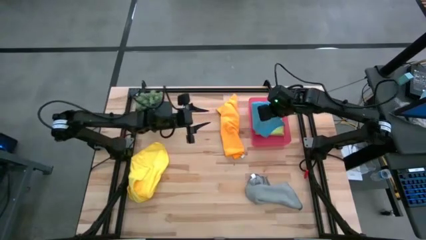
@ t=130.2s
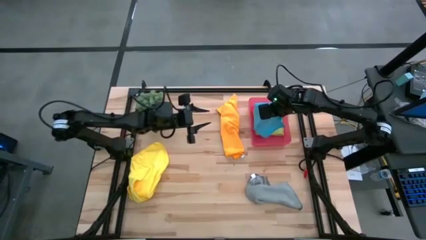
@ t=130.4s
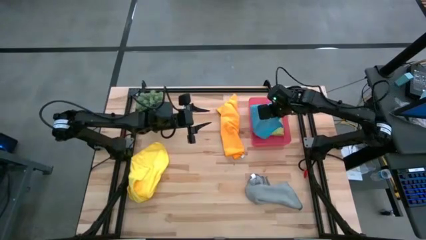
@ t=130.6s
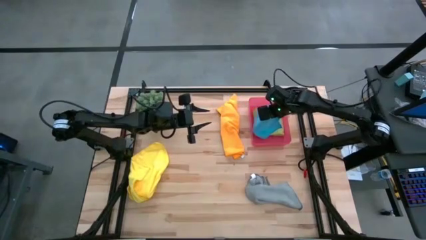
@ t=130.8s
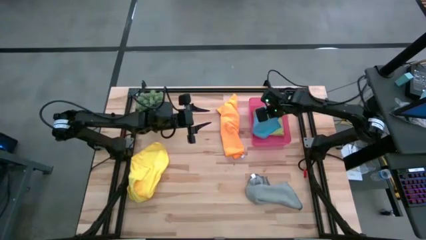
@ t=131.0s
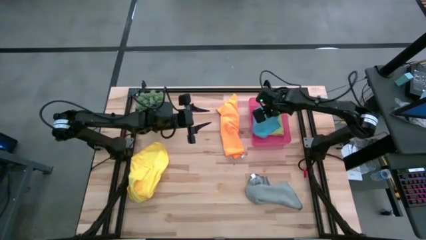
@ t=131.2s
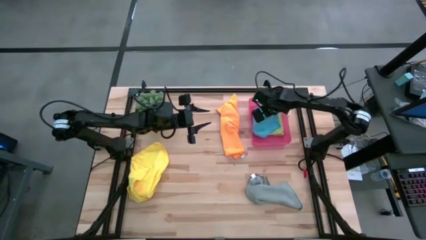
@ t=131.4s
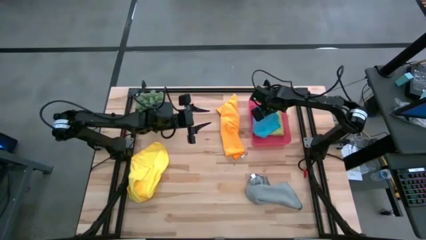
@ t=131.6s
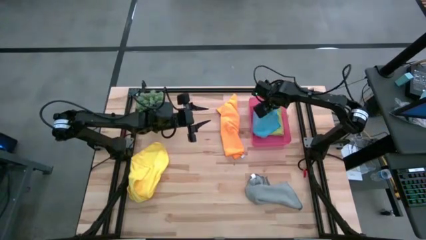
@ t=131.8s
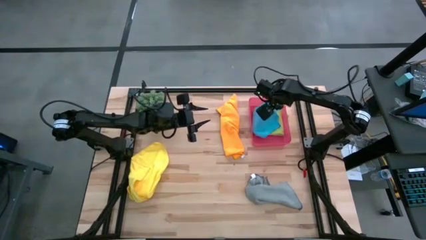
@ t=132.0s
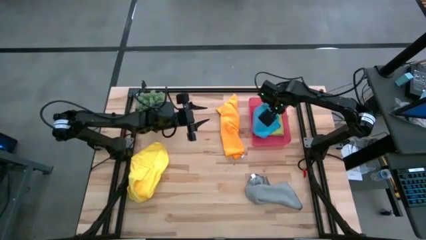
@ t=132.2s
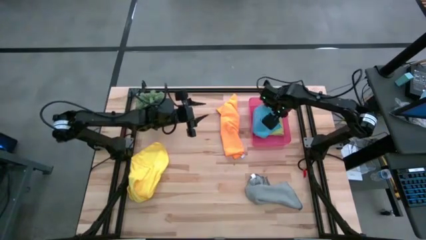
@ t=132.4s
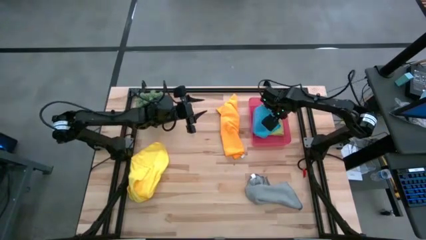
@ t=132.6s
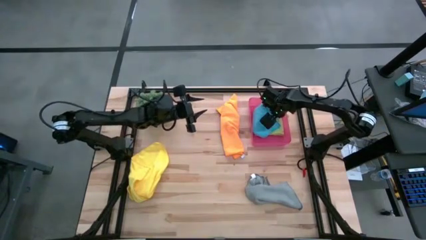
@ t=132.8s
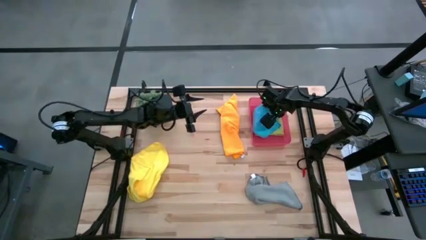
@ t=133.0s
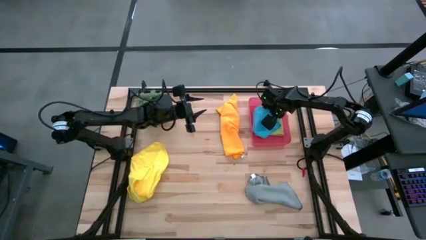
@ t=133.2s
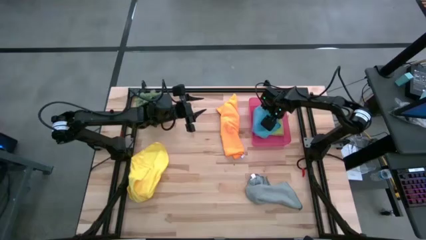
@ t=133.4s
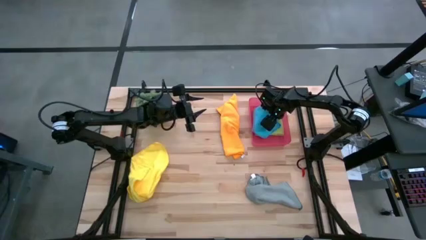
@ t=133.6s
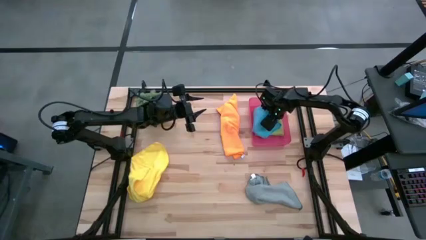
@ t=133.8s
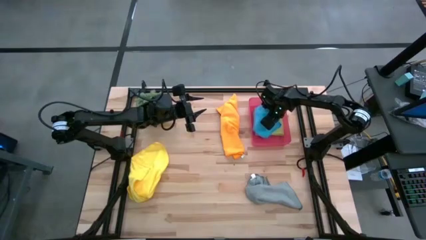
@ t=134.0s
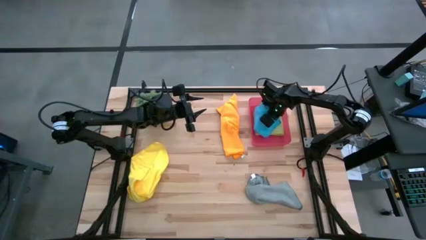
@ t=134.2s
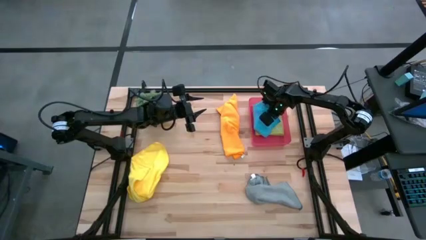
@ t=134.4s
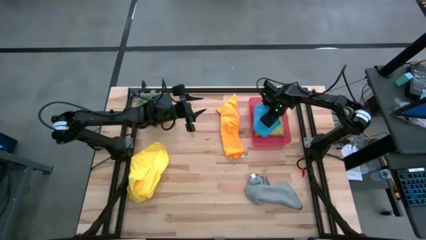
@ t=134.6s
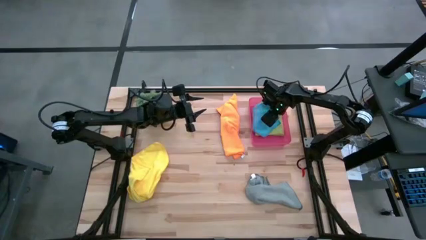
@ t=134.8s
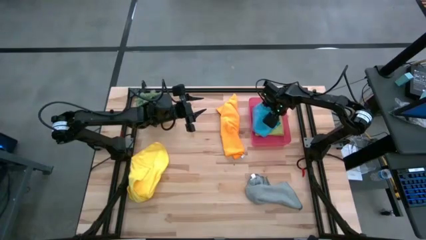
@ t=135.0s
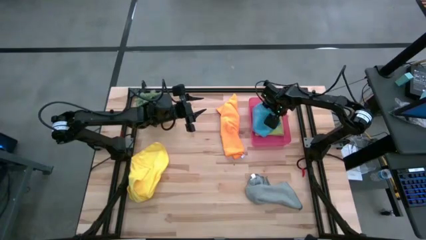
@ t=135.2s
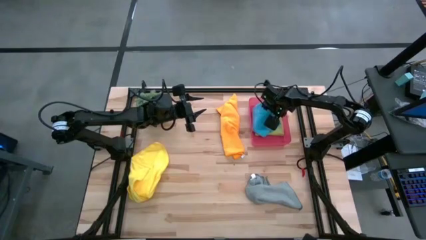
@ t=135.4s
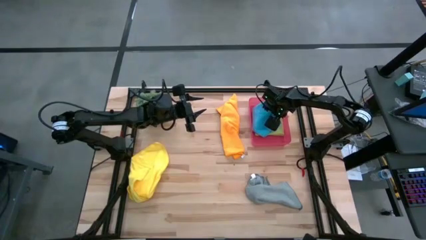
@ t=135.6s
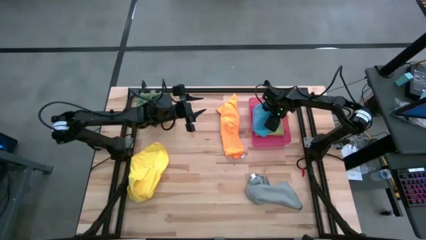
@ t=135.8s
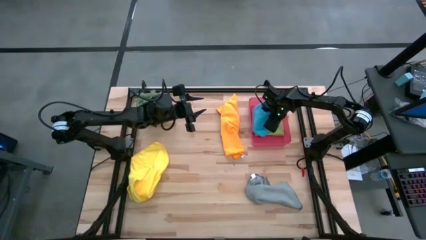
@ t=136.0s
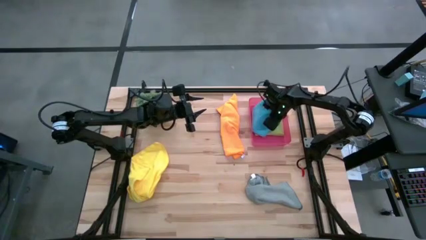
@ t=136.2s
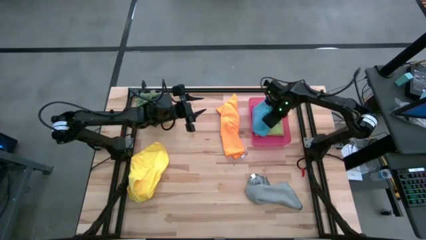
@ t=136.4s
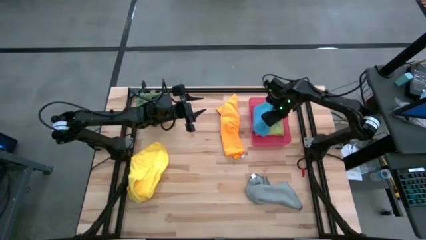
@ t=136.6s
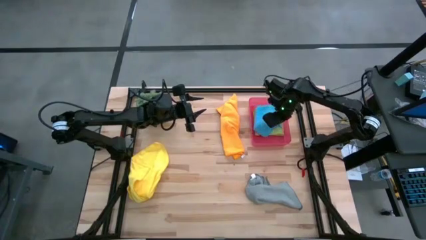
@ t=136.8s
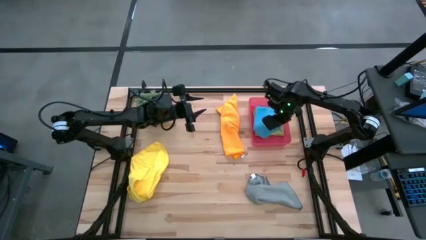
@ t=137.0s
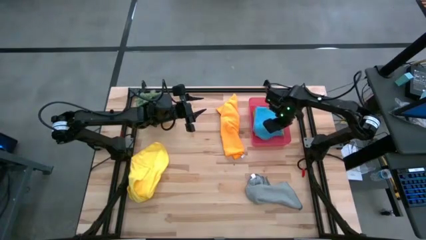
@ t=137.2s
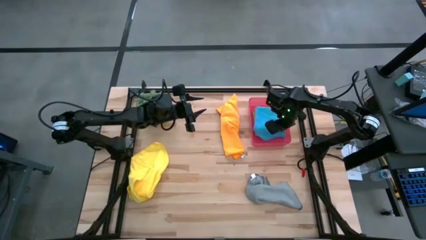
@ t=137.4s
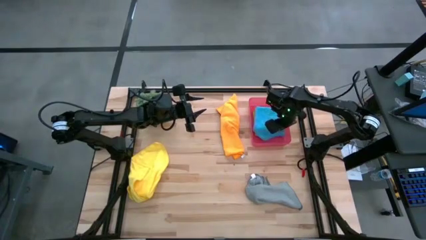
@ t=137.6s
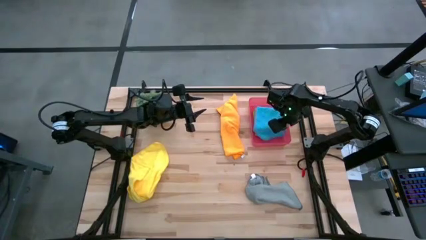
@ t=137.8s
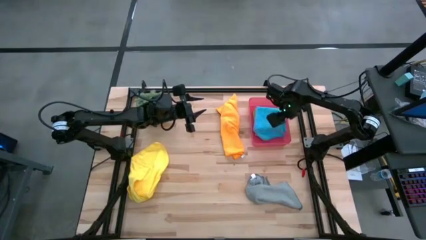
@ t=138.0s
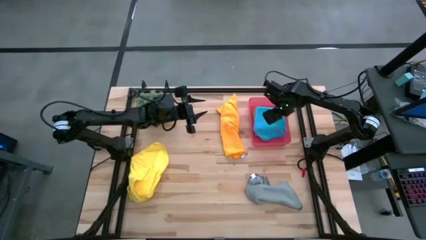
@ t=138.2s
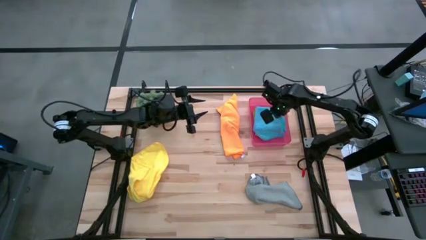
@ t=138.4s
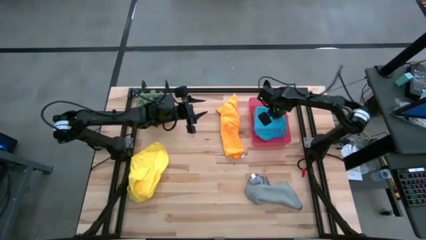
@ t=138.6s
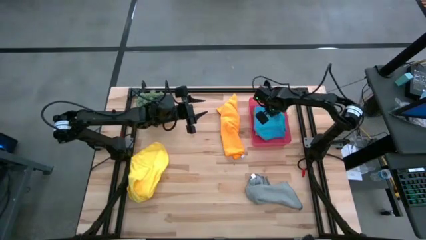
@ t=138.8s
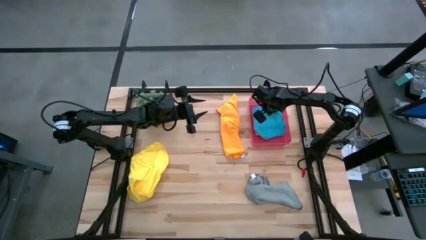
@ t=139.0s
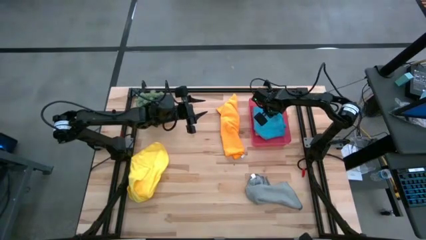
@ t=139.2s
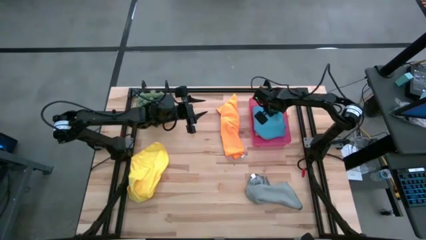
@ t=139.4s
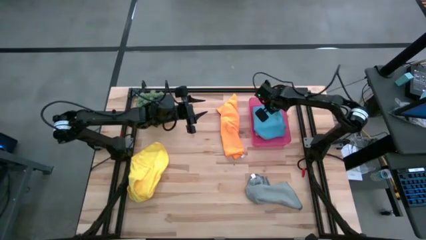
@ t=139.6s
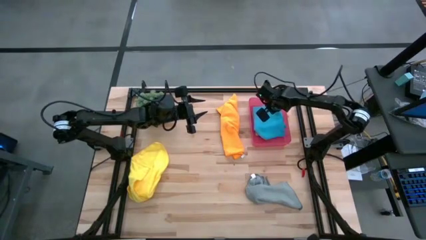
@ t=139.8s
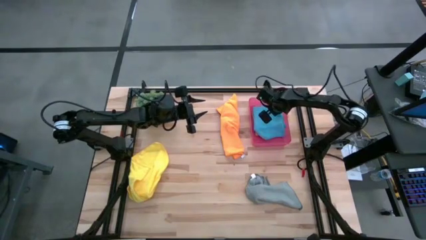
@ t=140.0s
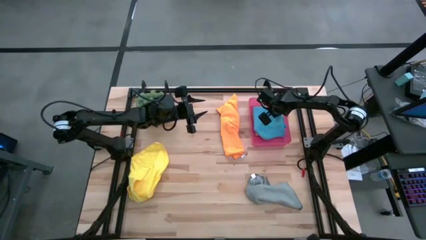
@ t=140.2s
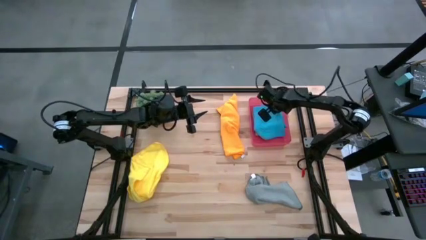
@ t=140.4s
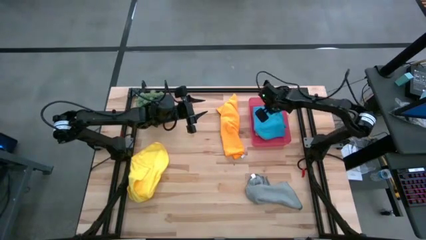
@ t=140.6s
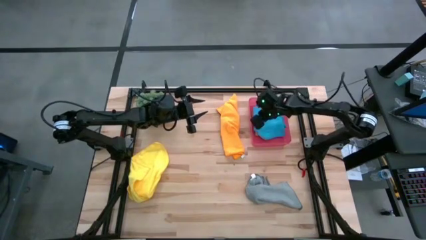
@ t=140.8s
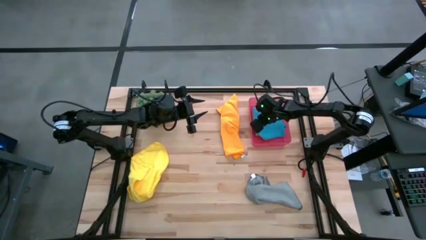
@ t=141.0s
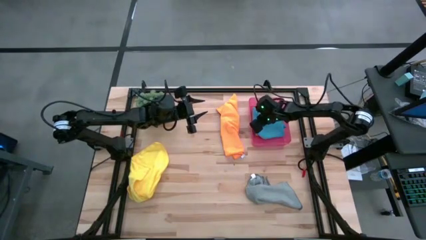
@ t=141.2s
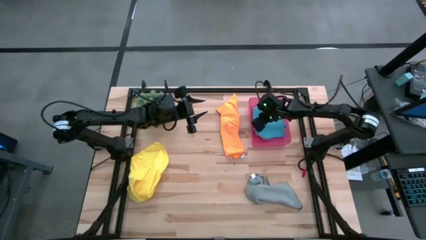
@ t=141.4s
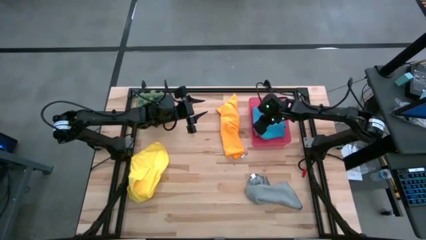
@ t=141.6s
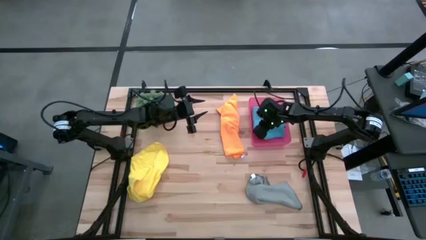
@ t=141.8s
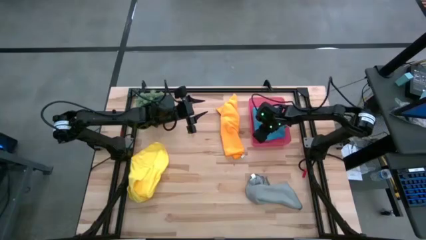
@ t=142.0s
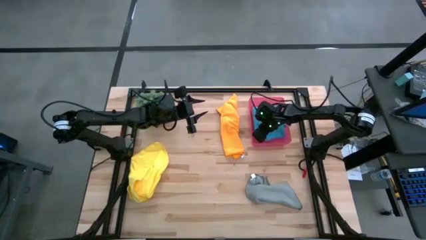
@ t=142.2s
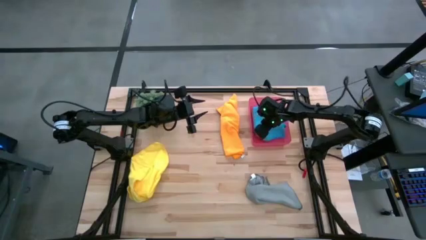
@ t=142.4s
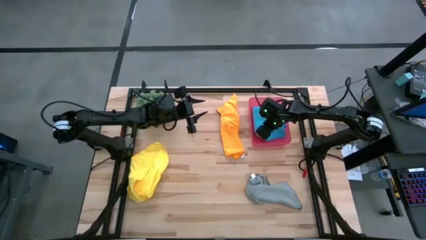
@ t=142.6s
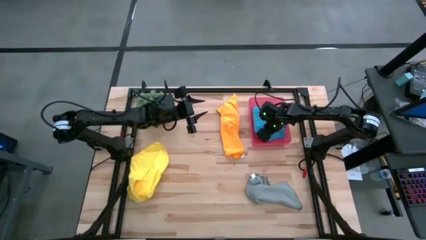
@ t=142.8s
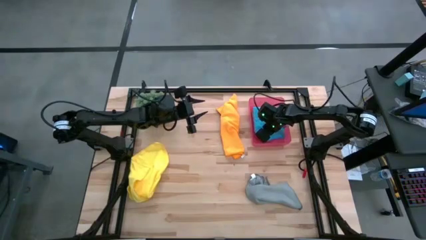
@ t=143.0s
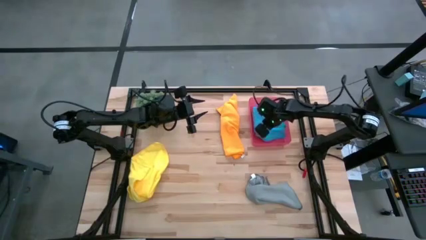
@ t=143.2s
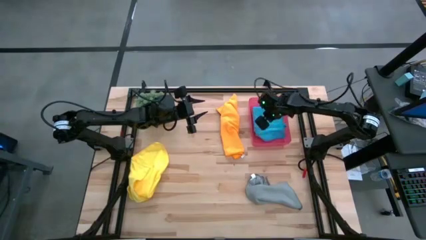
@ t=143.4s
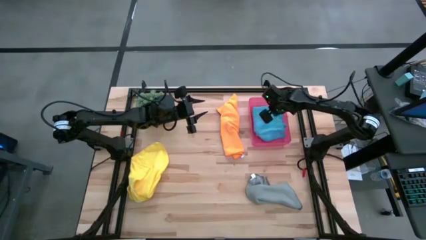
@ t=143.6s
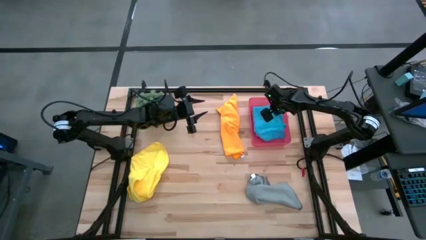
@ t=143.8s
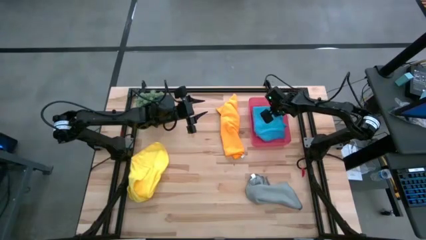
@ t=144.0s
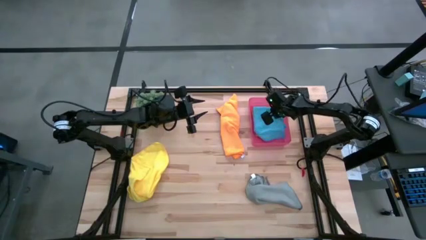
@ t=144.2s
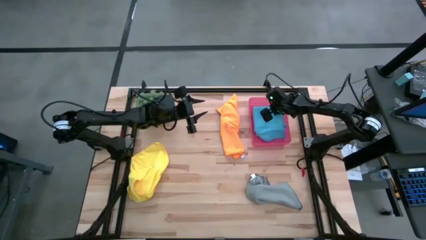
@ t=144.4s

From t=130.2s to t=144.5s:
Task: Fold microfiber towels
Put the blue microfiber cloth into the pink bin
